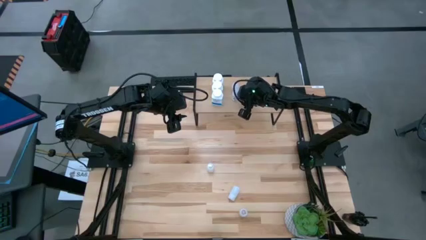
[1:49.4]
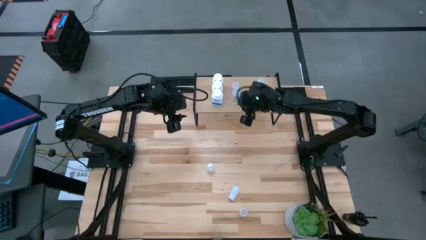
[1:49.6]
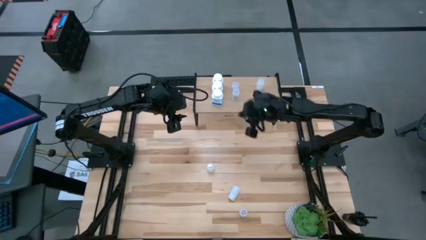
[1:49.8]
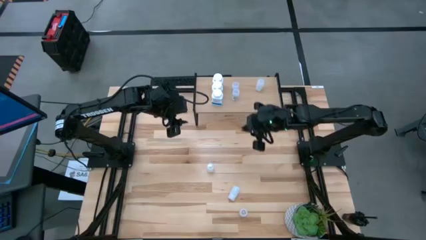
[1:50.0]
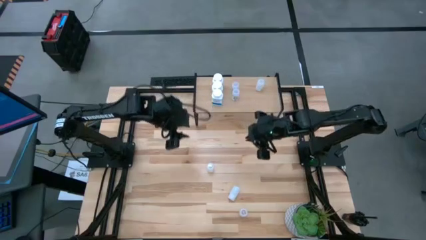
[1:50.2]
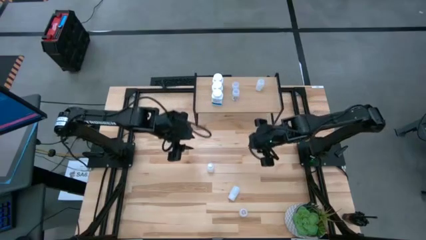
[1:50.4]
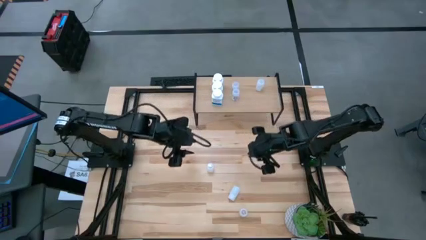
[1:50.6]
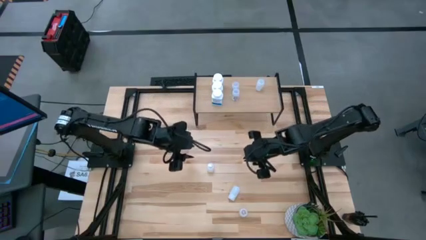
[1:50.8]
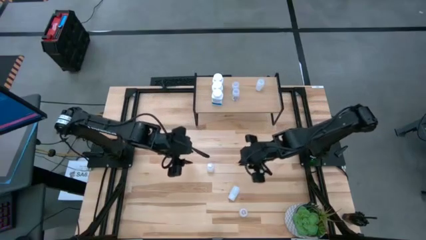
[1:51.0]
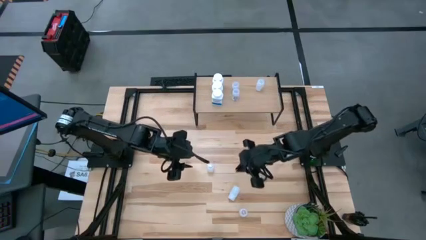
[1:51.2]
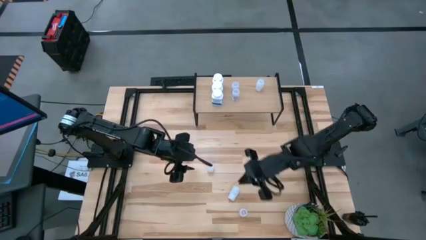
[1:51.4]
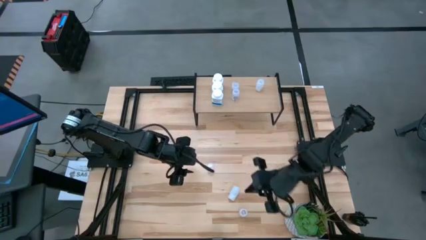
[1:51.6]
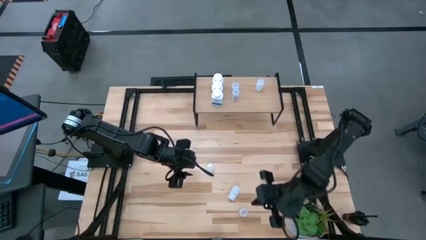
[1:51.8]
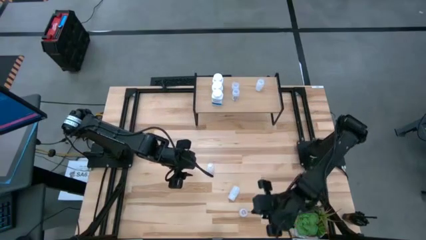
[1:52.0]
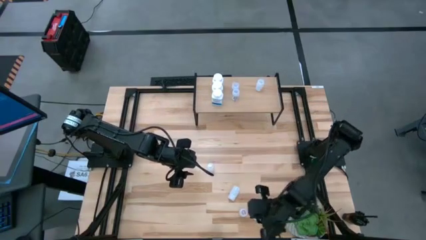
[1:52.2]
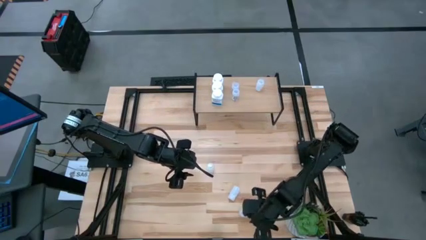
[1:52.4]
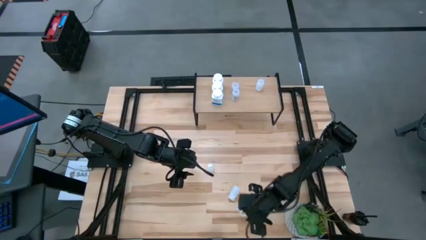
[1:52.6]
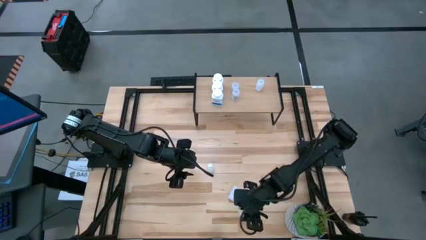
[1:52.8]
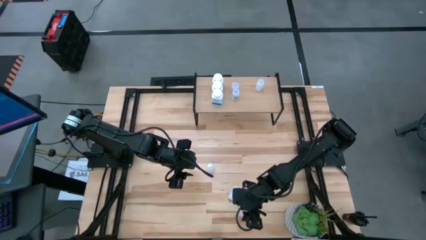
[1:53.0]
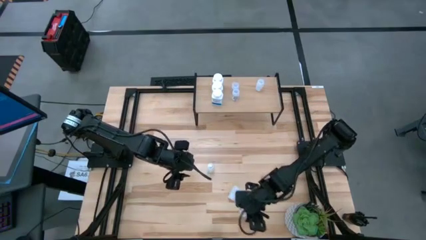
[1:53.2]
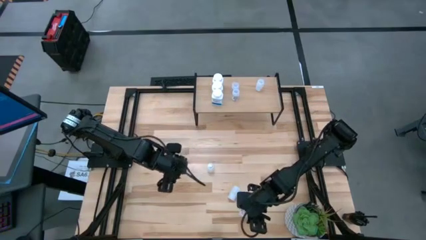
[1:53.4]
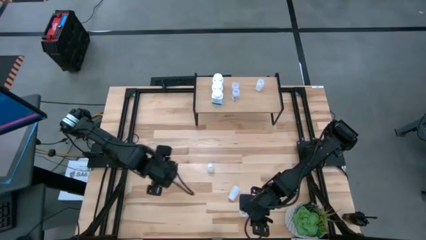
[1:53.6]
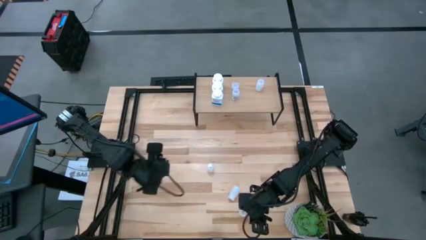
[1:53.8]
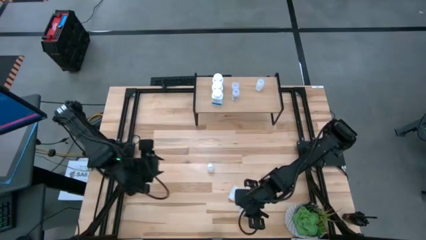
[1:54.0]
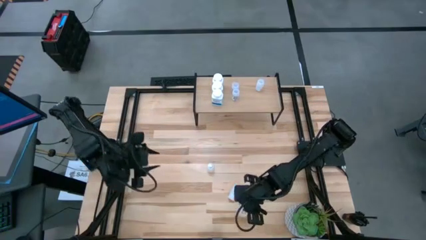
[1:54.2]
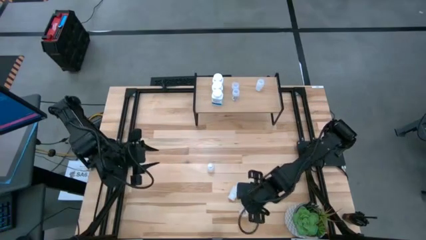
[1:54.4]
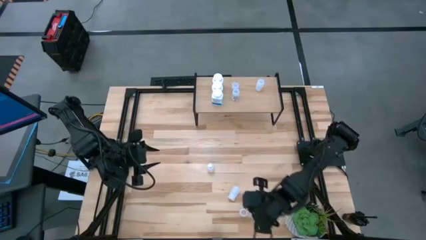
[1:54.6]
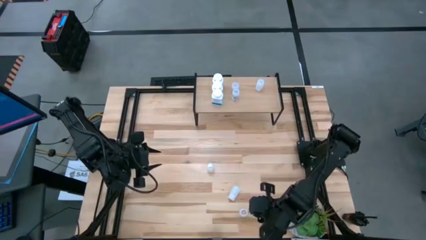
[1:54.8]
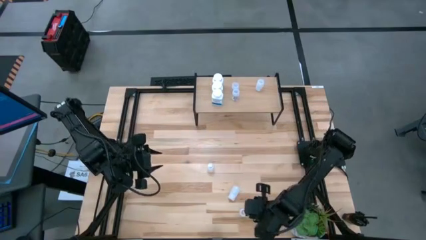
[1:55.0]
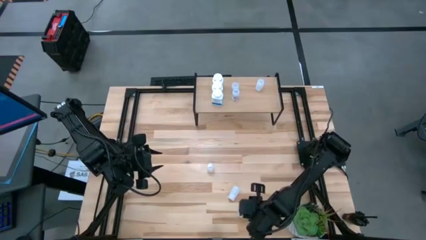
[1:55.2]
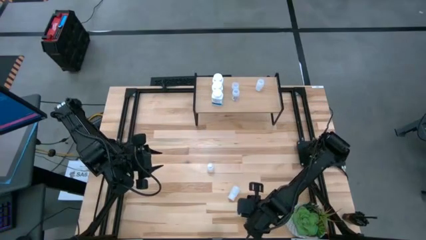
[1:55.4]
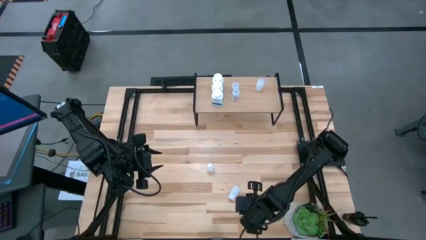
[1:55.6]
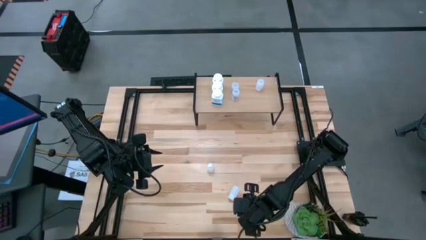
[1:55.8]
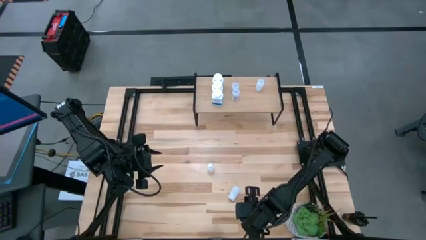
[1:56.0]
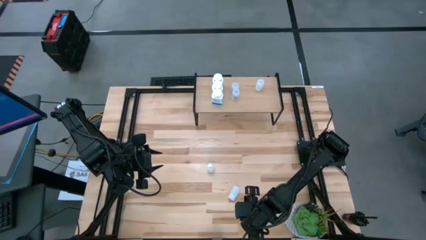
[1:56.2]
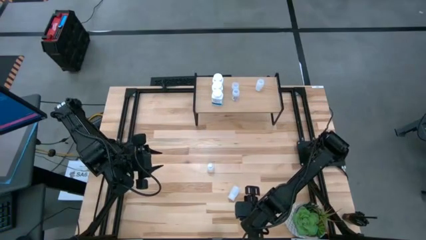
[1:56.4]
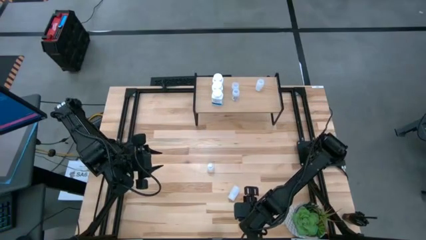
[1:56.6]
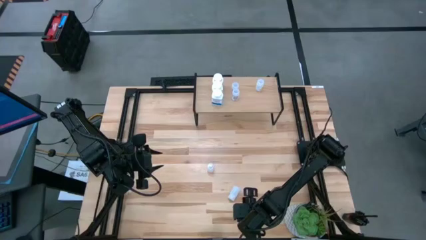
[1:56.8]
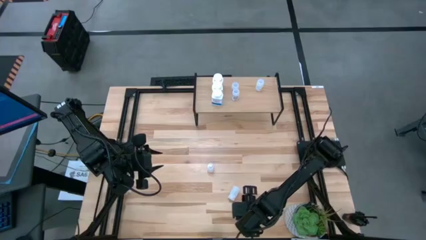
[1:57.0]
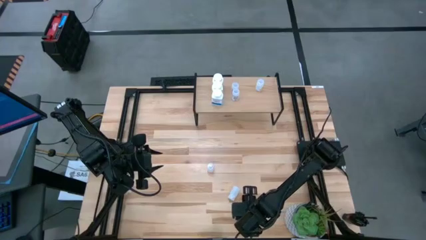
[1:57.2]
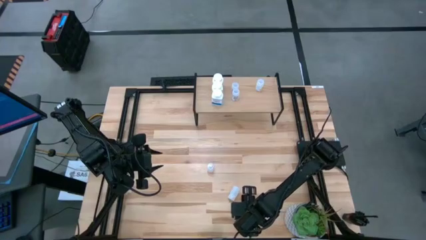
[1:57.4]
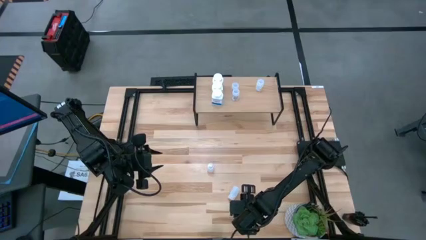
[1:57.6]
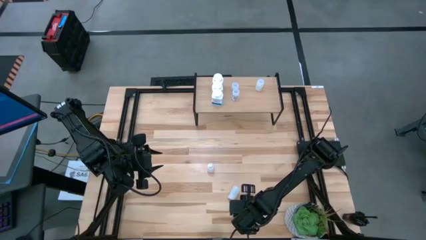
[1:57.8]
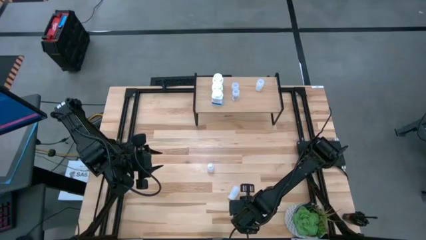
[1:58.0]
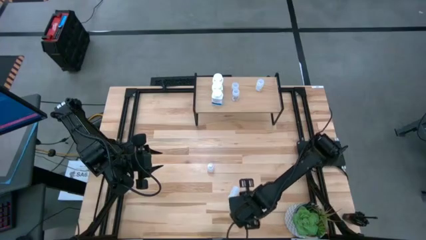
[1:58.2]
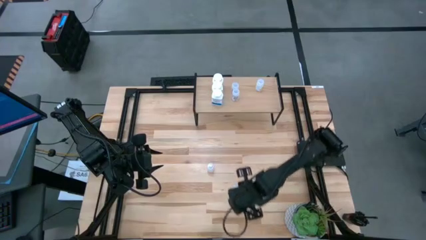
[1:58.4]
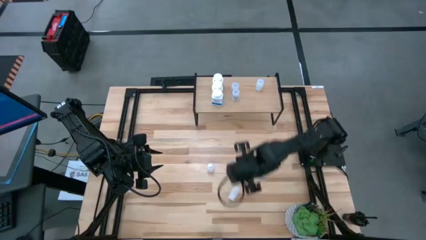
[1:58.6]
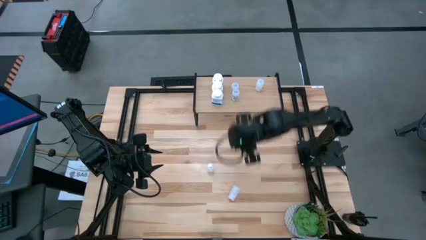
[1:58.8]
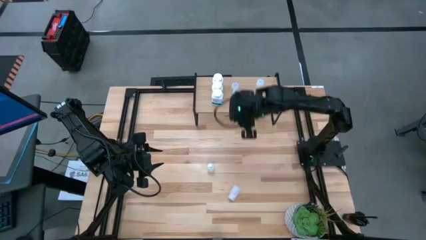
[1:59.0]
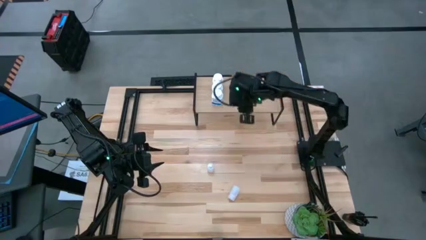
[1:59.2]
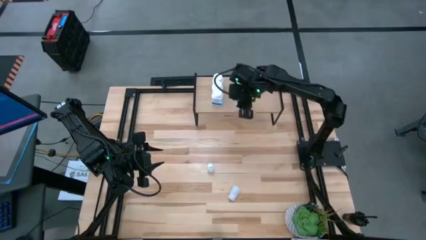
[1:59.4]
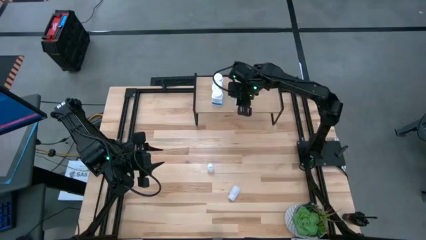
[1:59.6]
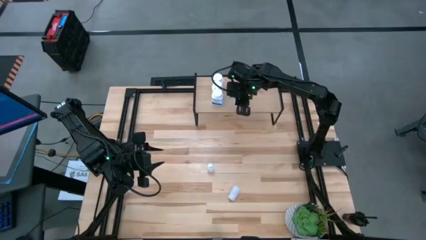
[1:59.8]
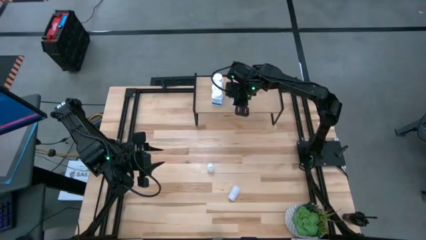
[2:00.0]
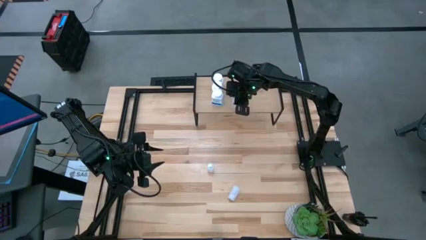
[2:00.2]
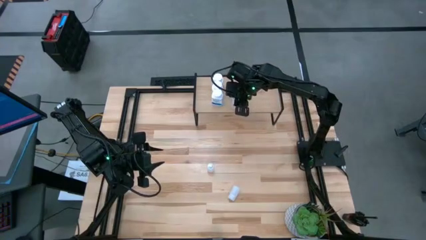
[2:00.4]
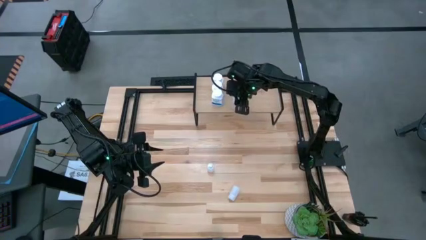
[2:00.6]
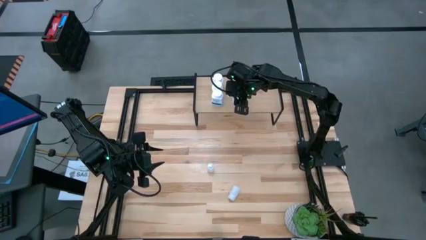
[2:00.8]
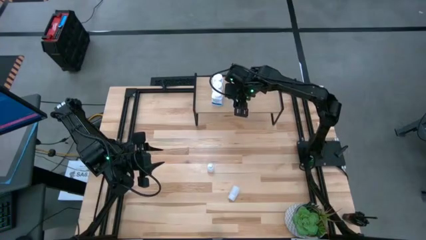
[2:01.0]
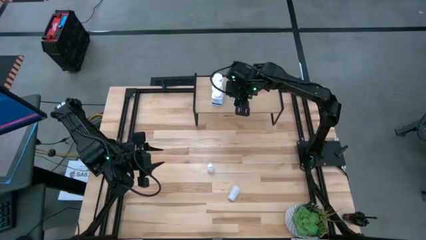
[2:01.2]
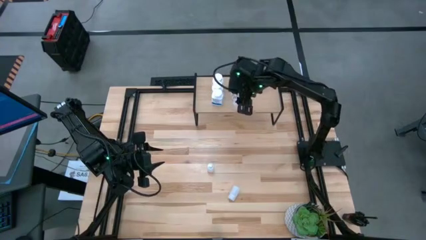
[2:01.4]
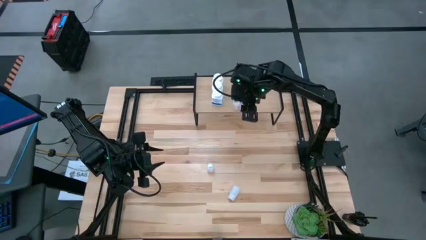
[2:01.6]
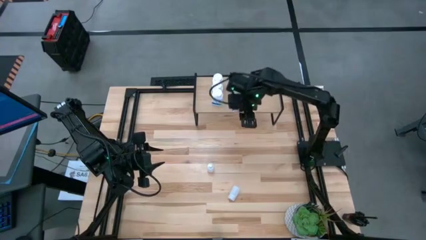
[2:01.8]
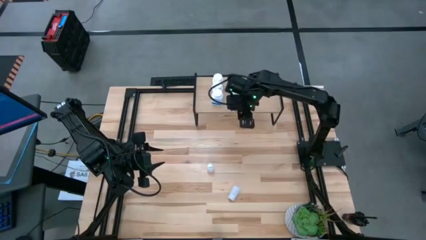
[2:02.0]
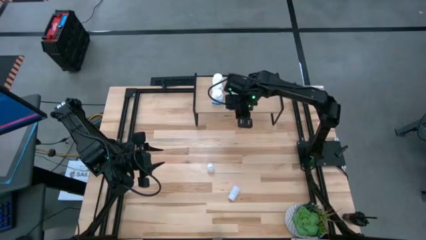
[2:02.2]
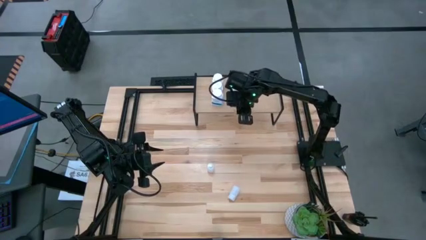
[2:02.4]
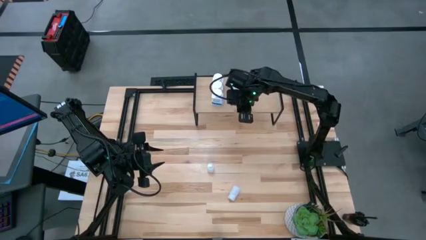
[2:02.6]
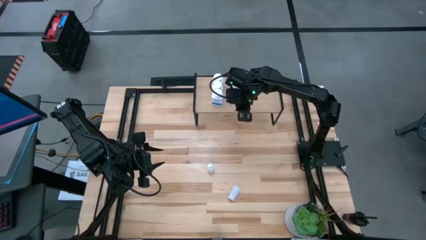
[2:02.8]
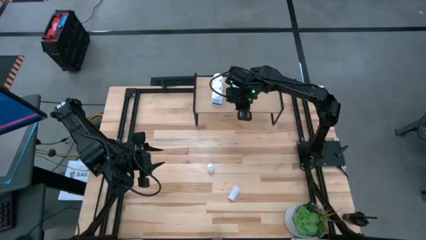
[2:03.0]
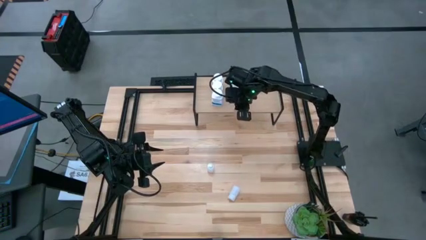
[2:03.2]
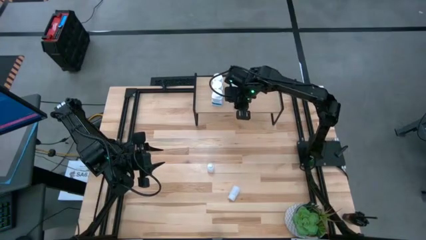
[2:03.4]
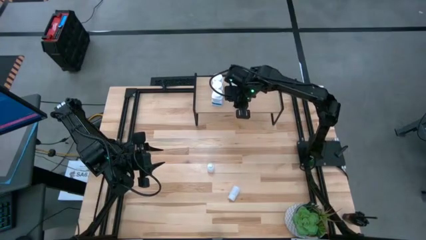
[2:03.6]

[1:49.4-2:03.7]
Task: Pick and place medicine bottles onto shelf by color
Put the transparent pill bottle on the shelf aligned with the other transparent bottle
